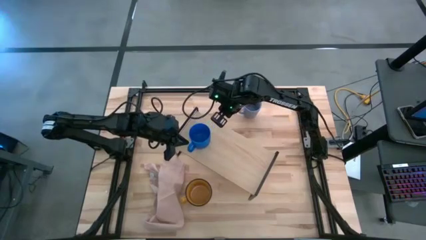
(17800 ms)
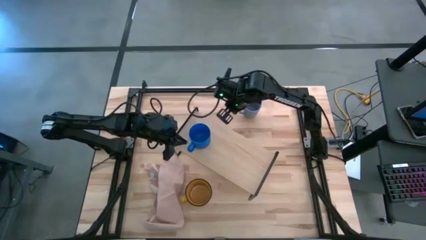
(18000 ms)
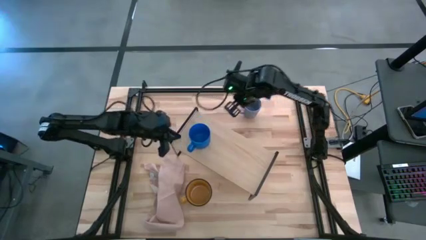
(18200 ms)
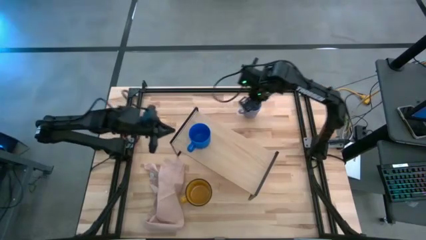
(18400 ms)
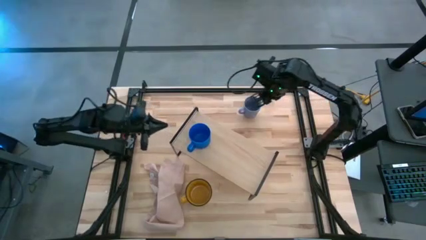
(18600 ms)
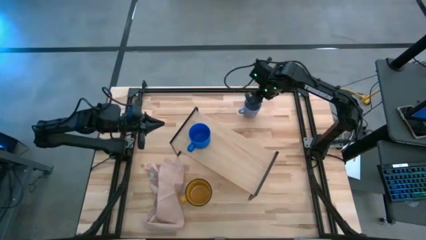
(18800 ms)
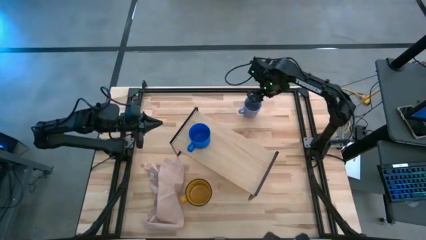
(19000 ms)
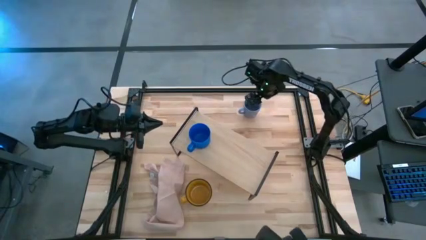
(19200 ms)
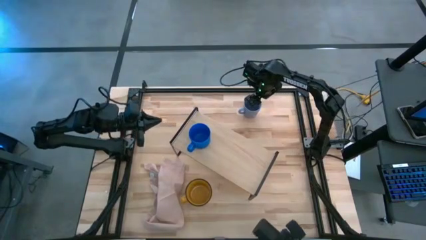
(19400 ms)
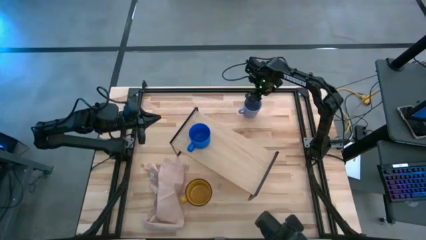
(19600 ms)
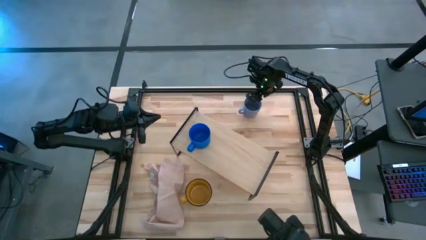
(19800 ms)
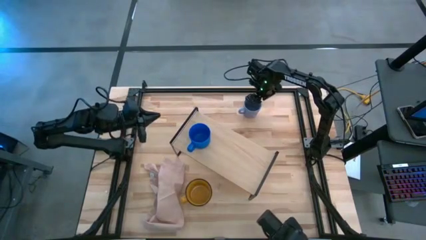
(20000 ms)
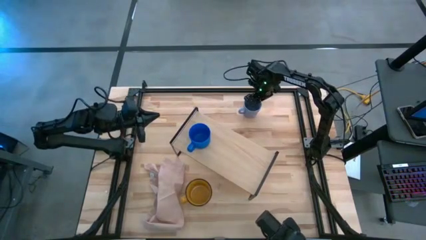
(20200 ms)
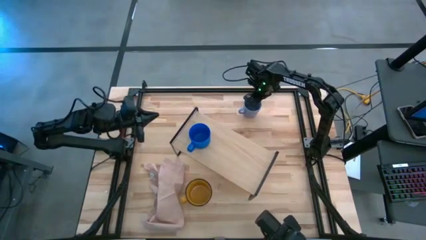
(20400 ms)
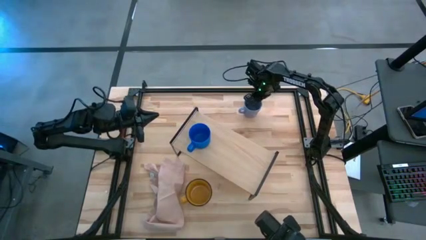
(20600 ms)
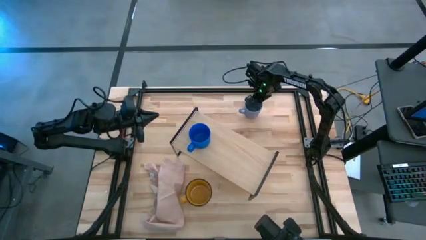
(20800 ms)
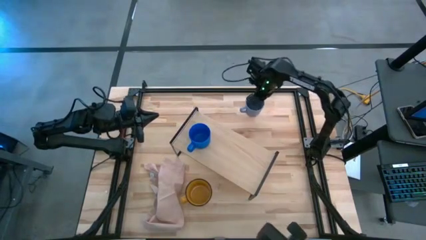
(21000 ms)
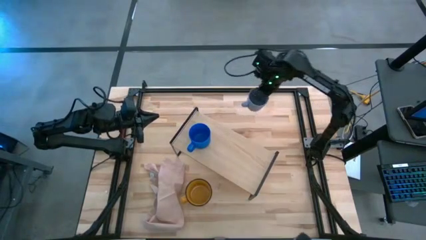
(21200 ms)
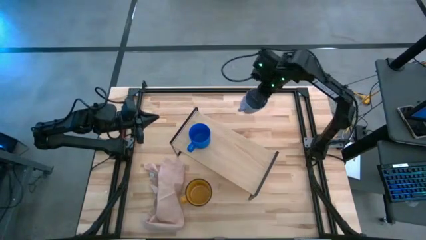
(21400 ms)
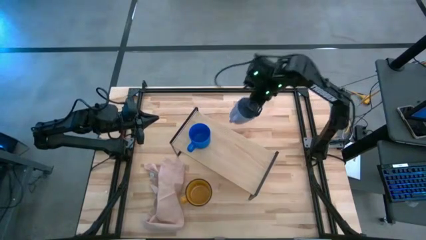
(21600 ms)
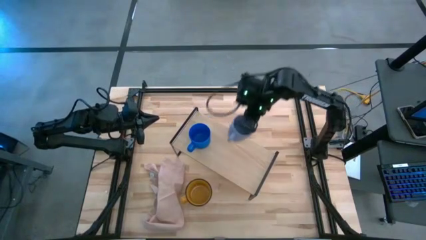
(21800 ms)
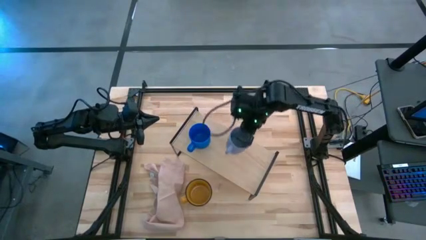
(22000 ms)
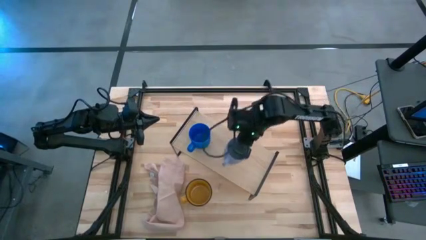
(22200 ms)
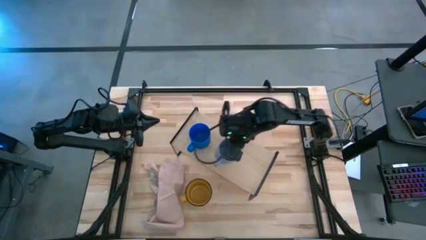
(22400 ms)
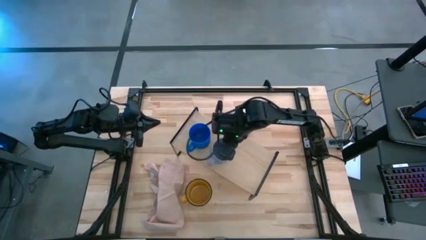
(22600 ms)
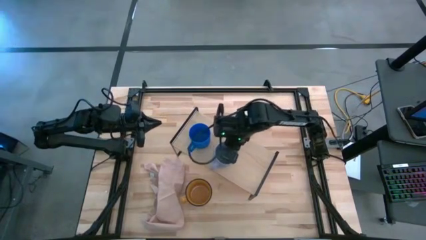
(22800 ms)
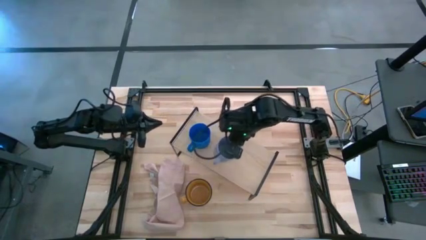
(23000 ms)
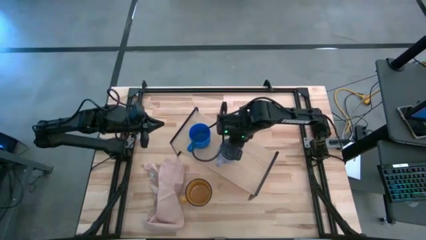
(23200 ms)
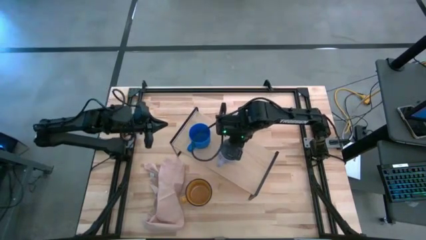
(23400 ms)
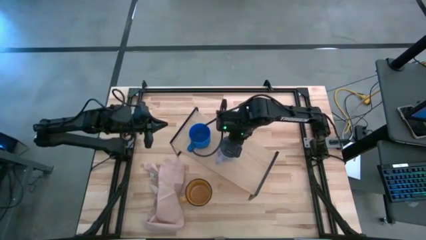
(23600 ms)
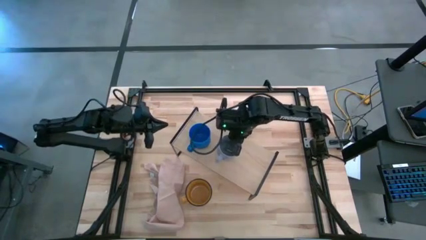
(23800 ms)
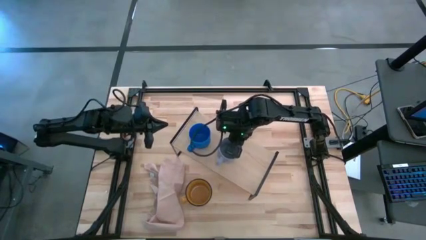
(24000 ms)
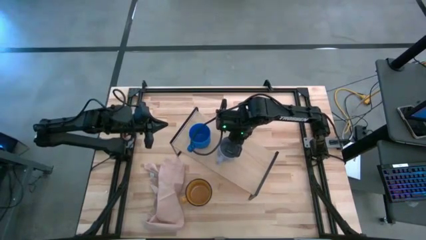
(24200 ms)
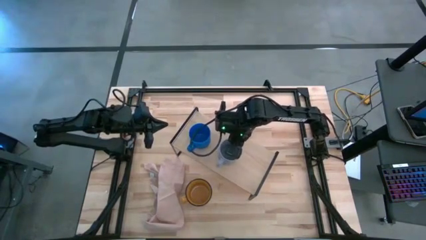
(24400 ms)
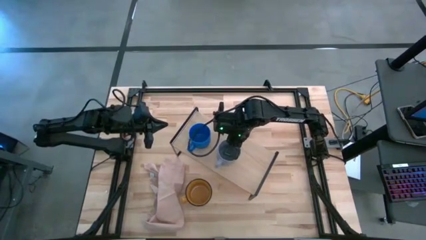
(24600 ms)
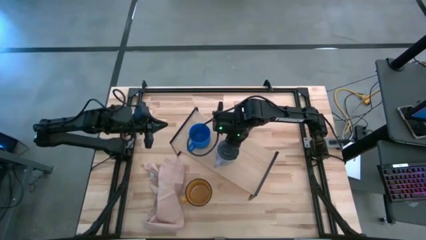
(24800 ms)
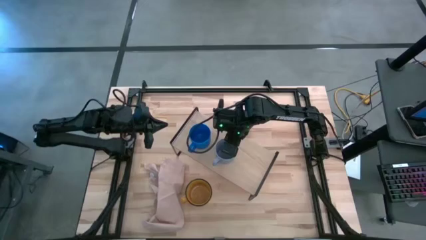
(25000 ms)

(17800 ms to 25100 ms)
Task: Stack small to large cups/mugs on shelf
Put the light blue mug on the shelf

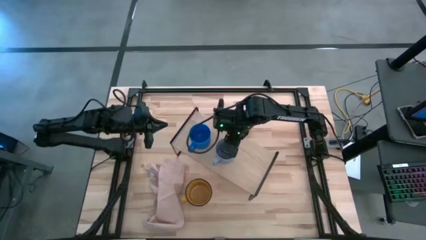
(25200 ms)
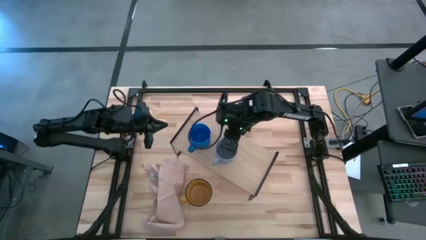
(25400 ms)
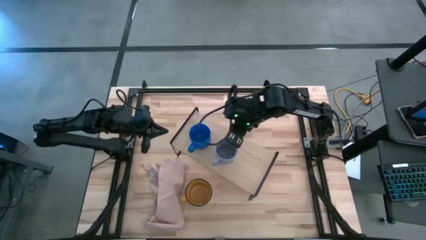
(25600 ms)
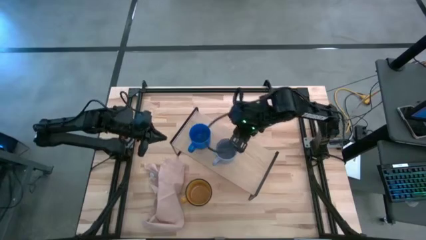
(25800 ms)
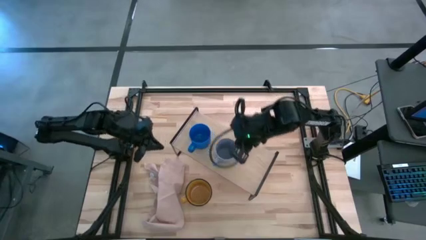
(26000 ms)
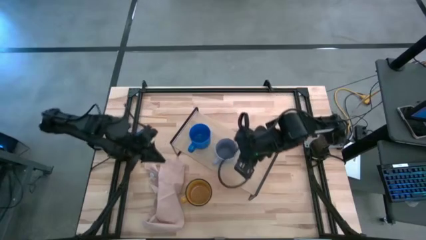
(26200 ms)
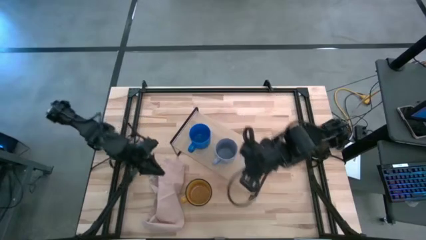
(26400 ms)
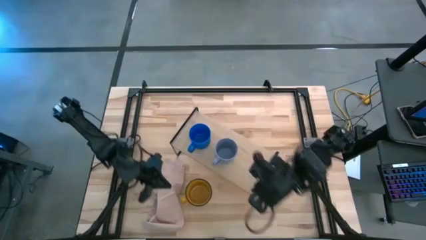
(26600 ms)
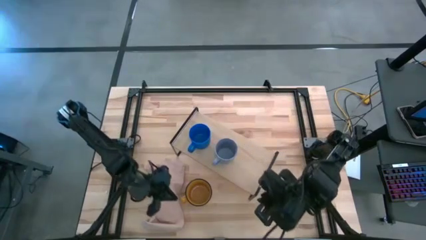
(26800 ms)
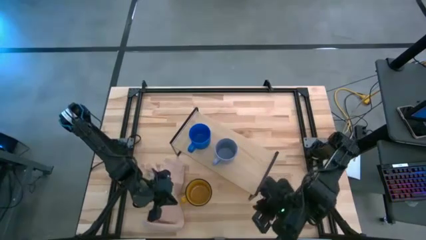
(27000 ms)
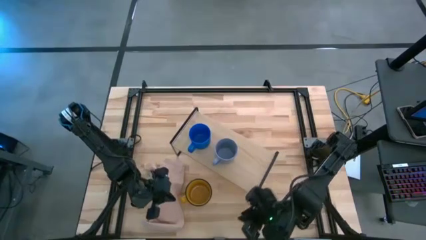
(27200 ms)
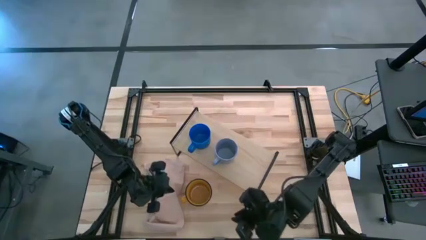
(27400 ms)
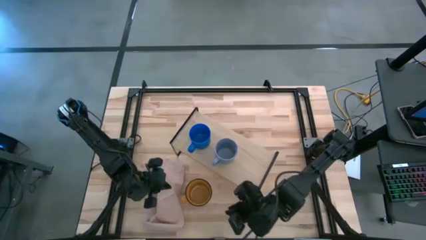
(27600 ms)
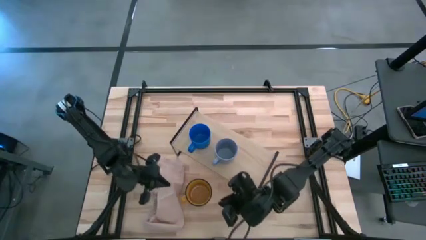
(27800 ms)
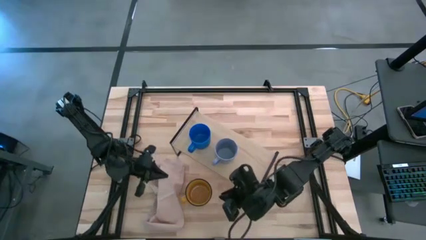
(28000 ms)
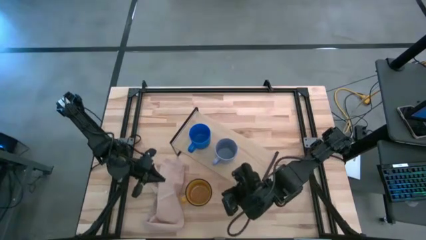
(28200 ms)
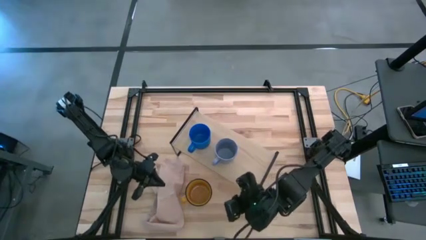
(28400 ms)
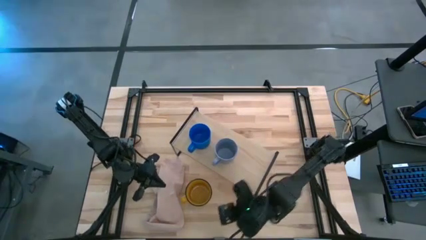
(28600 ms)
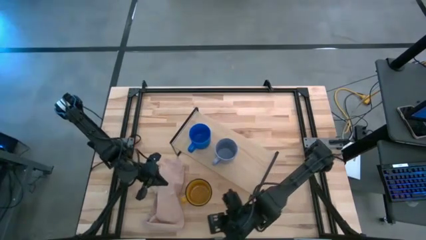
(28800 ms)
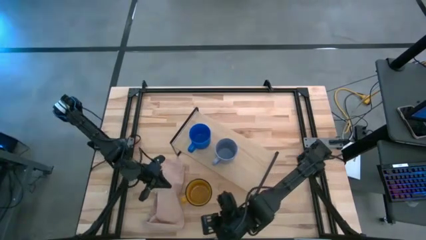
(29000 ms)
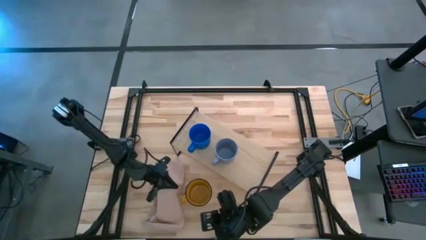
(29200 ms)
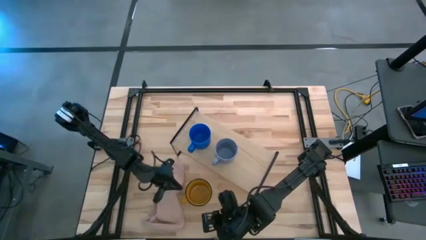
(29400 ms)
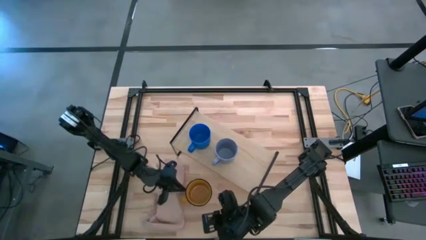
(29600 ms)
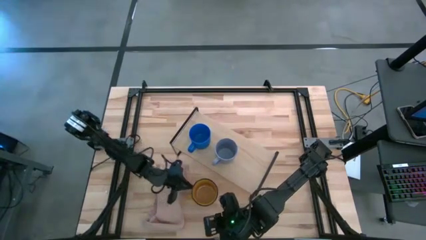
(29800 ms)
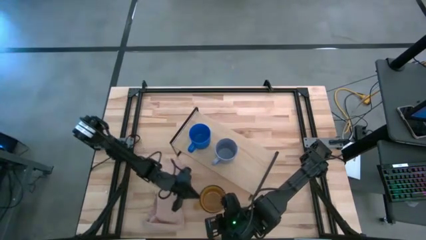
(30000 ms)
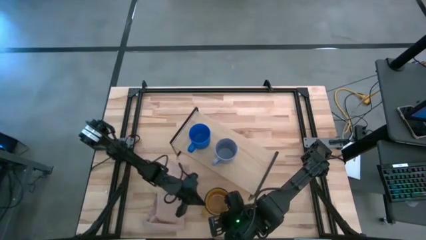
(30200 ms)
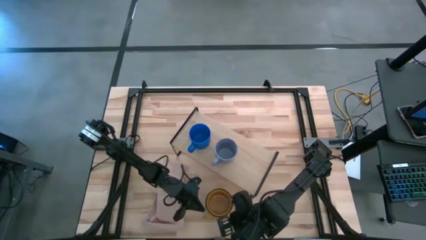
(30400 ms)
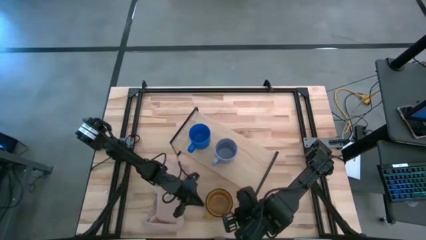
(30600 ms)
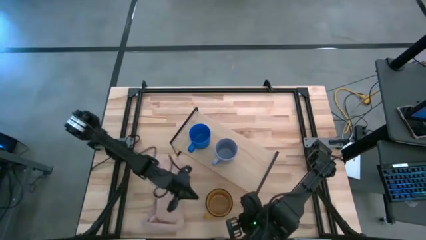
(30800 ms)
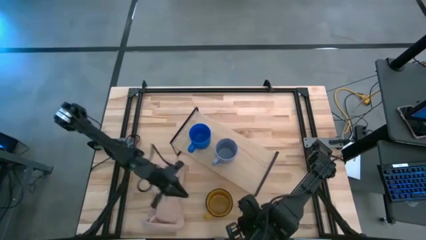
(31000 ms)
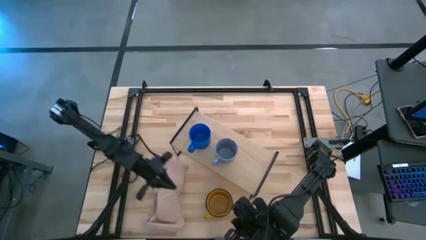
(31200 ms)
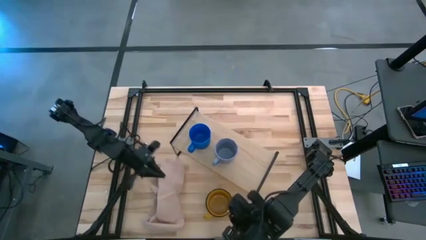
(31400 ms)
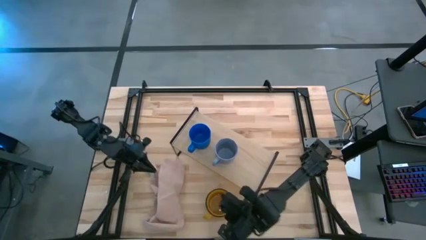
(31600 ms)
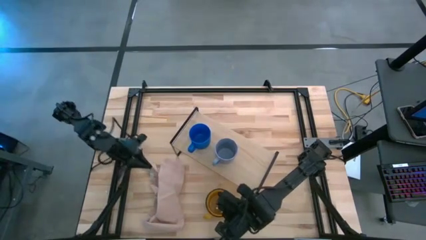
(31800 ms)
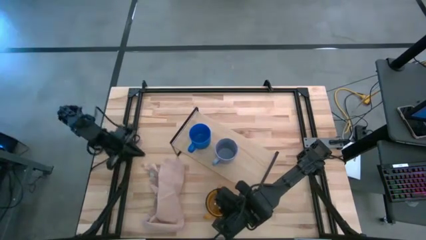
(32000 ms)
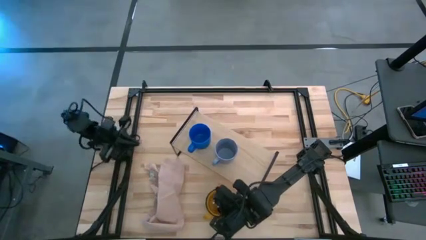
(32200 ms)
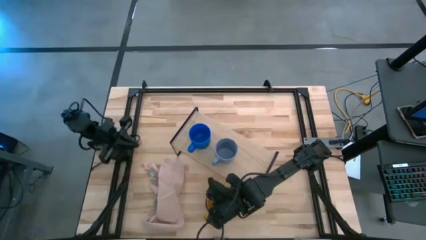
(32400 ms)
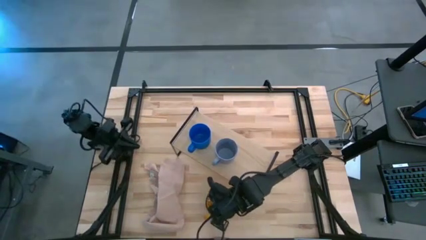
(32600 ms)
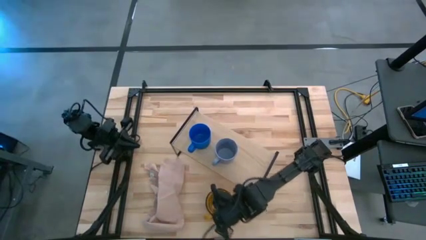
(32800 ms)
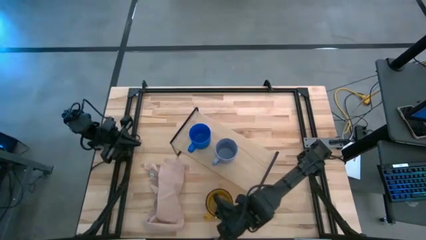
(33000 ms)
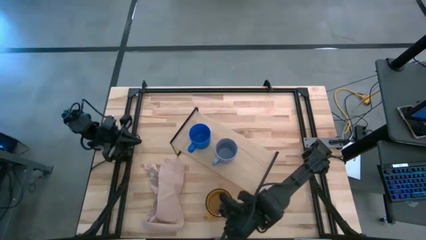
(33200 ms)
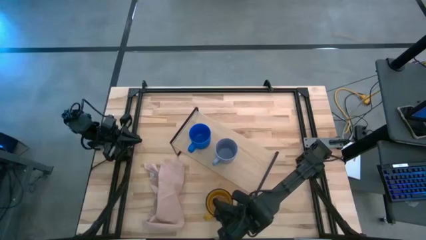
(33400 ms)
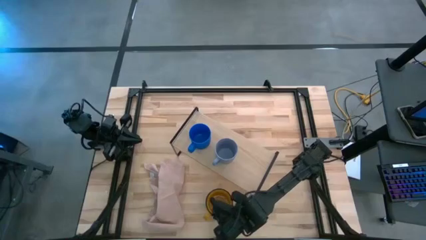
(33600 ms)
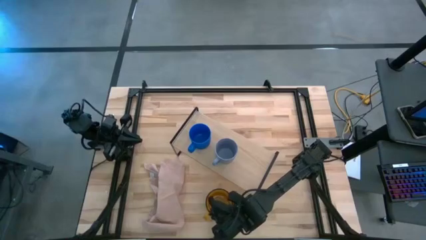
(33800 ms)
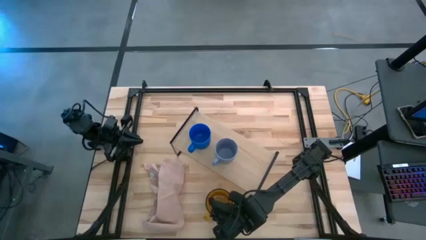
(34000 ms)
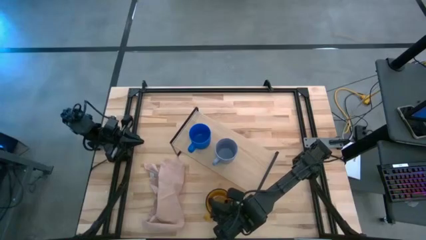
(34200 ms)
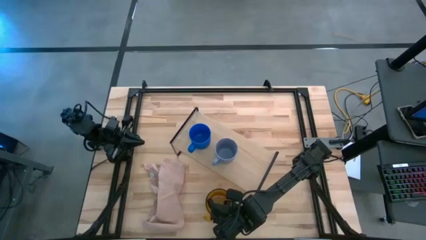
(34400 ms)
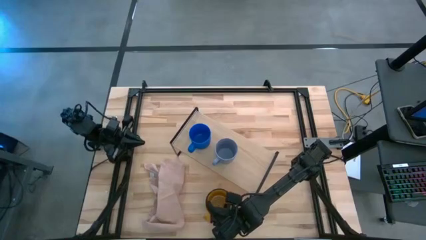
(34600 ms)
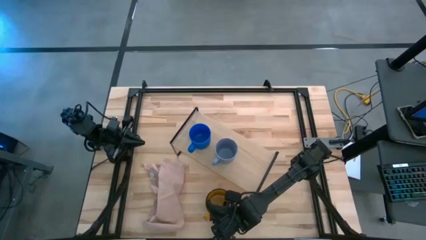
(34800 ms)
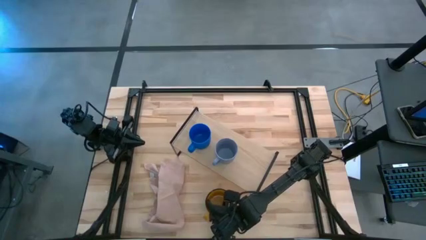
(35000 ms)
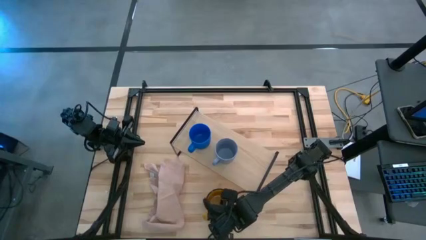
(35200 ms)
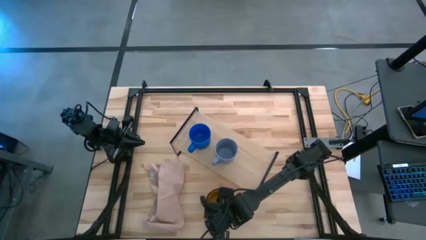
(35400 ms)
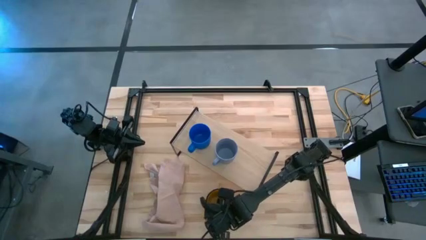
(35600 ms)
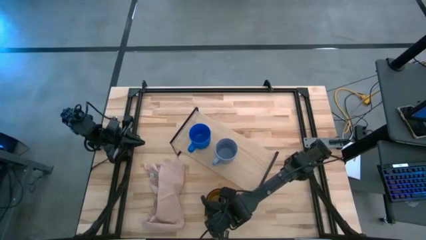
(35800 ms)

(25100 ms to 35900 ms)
Put the yellow mug on the shelf
